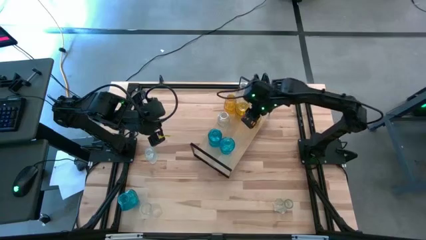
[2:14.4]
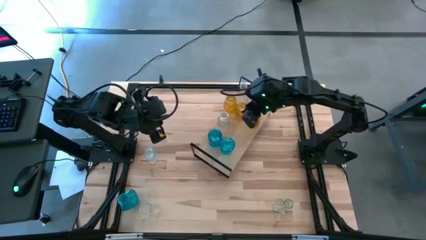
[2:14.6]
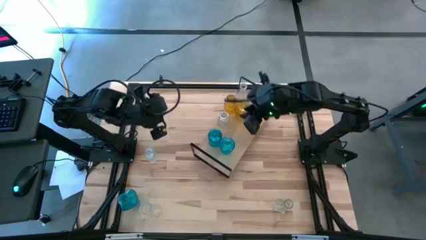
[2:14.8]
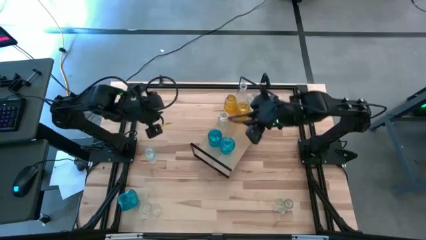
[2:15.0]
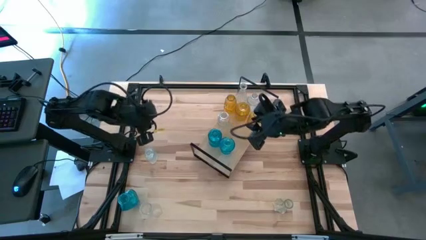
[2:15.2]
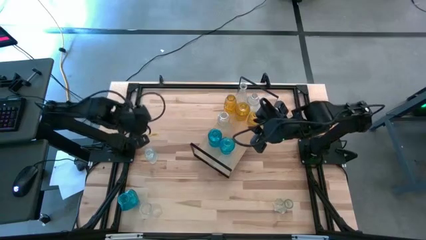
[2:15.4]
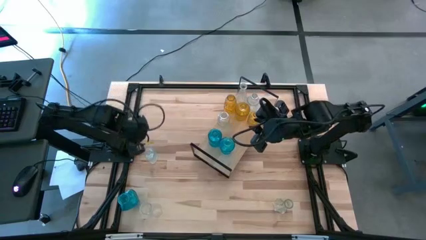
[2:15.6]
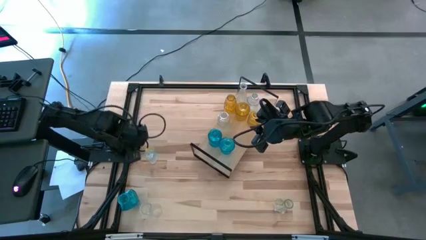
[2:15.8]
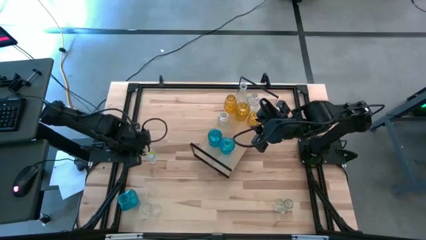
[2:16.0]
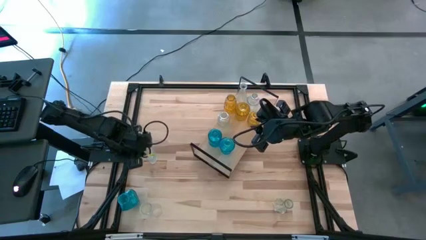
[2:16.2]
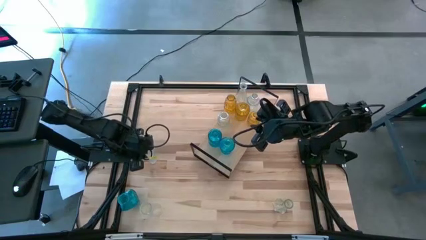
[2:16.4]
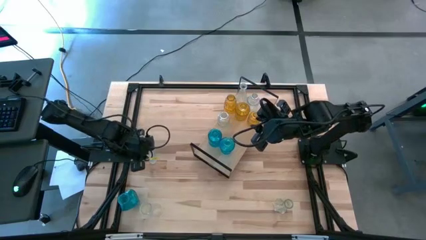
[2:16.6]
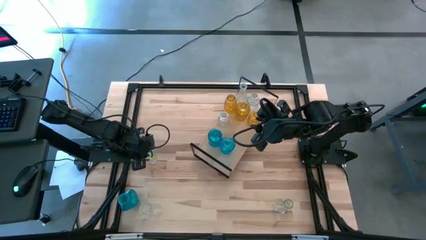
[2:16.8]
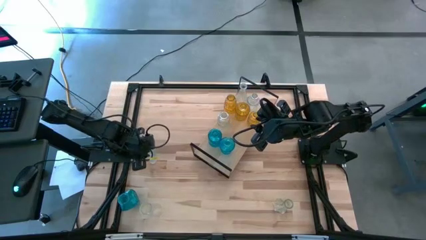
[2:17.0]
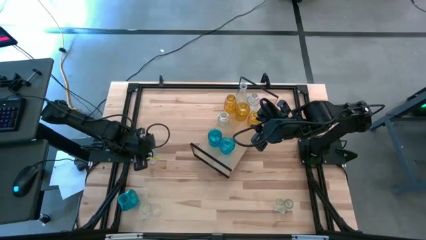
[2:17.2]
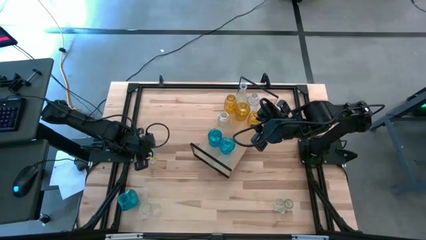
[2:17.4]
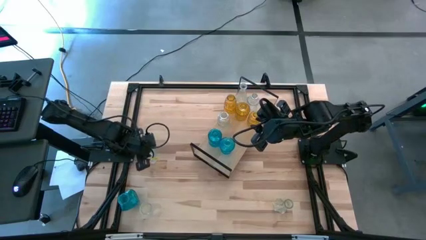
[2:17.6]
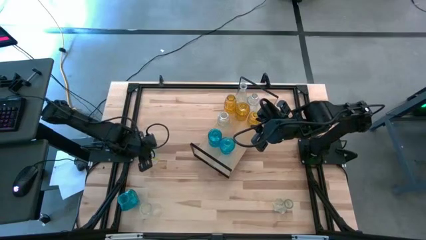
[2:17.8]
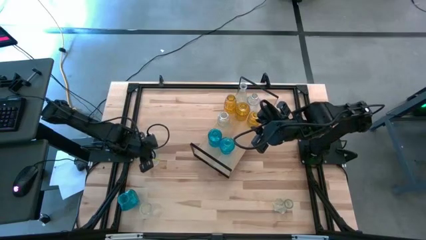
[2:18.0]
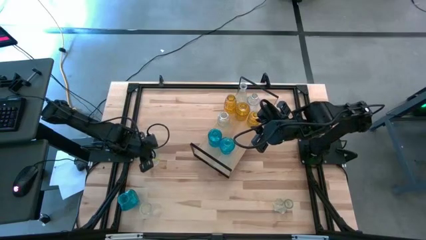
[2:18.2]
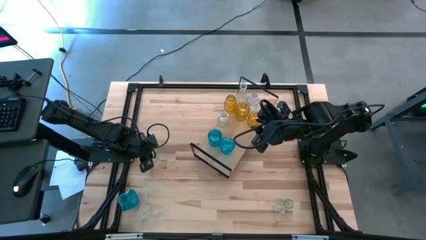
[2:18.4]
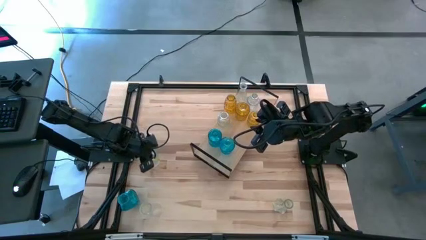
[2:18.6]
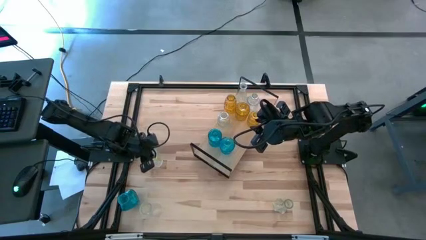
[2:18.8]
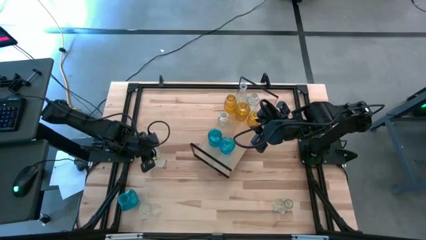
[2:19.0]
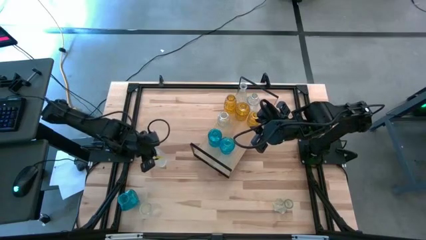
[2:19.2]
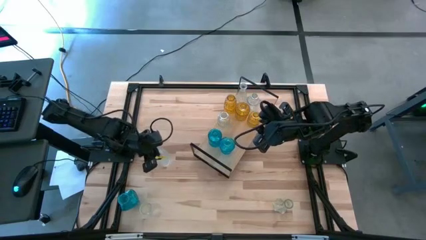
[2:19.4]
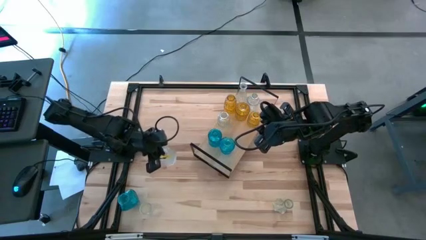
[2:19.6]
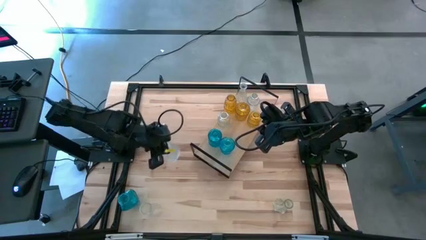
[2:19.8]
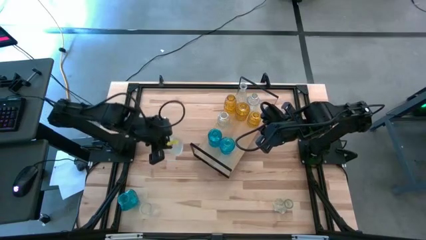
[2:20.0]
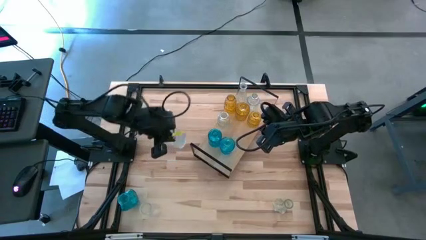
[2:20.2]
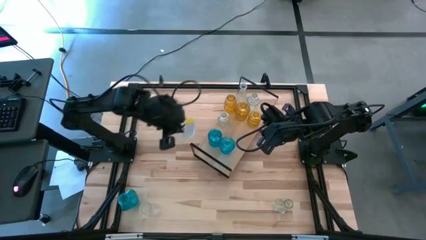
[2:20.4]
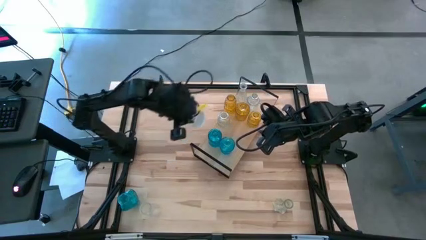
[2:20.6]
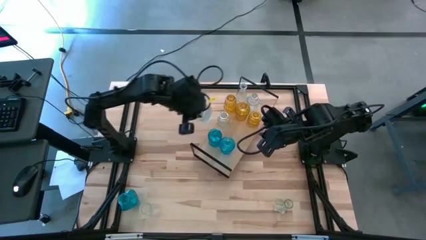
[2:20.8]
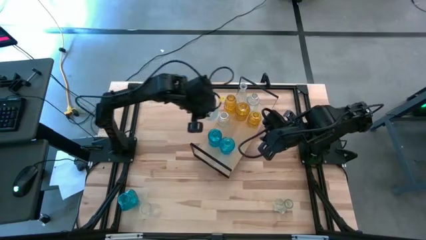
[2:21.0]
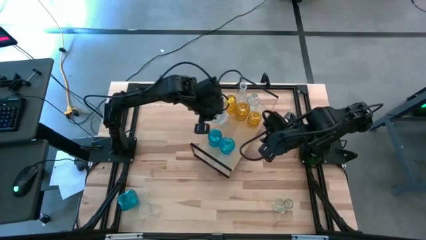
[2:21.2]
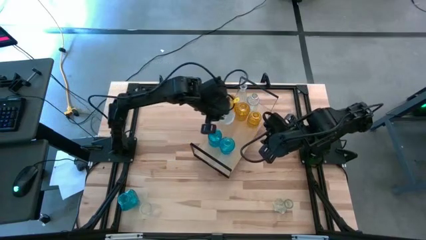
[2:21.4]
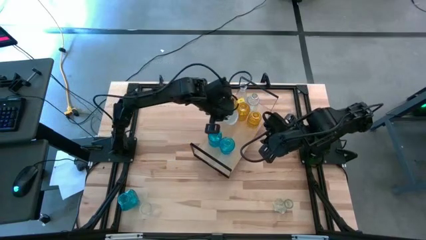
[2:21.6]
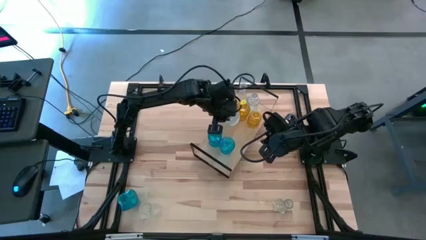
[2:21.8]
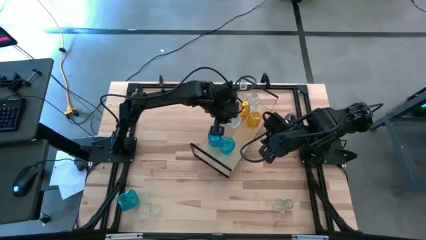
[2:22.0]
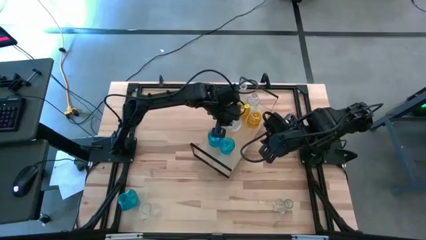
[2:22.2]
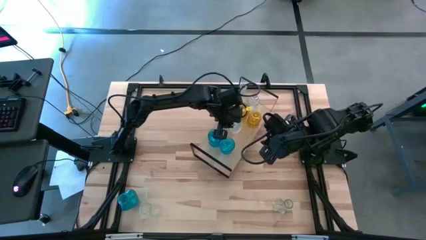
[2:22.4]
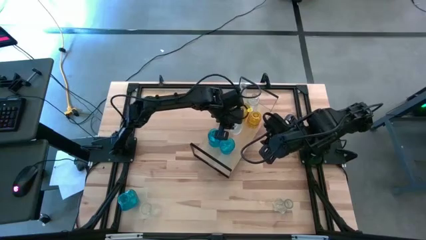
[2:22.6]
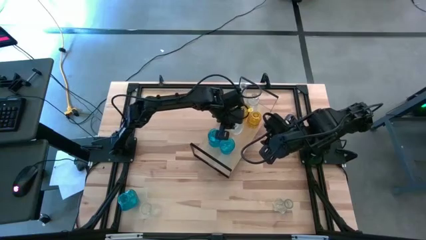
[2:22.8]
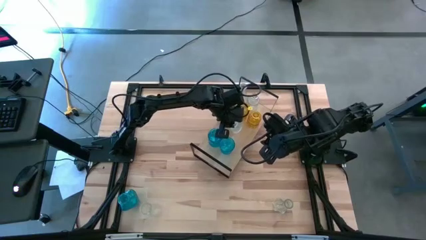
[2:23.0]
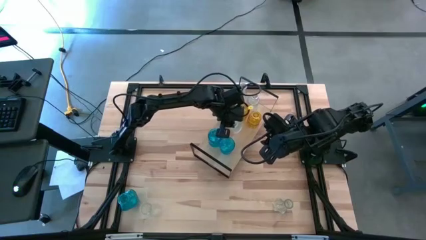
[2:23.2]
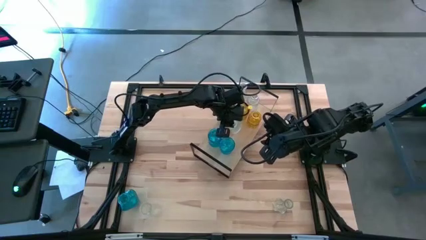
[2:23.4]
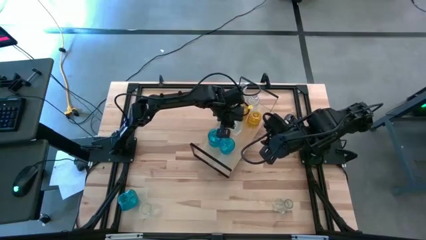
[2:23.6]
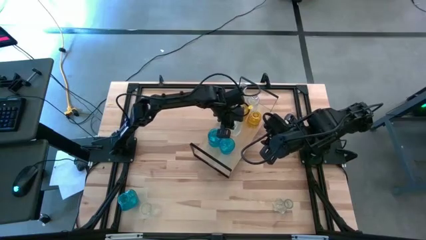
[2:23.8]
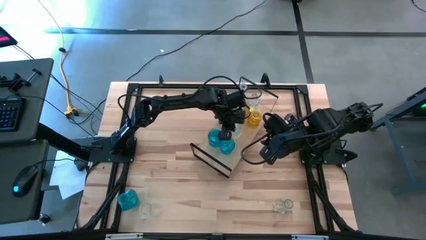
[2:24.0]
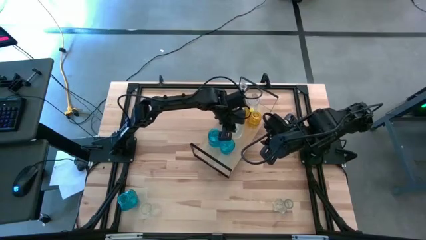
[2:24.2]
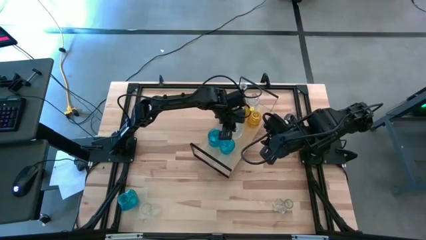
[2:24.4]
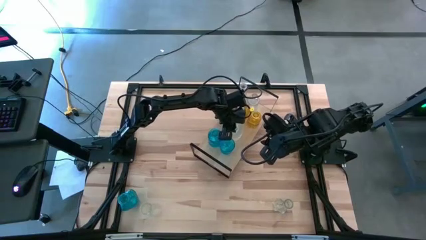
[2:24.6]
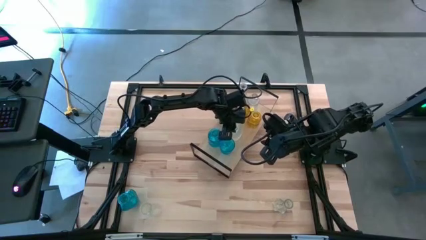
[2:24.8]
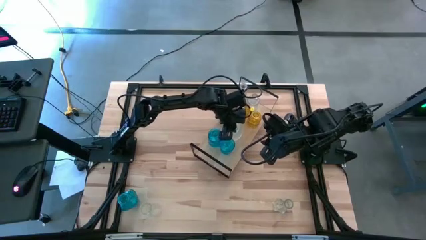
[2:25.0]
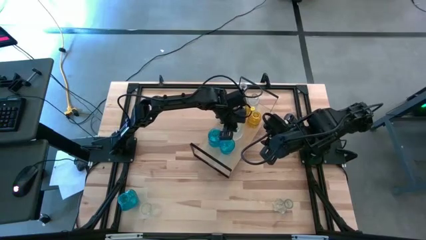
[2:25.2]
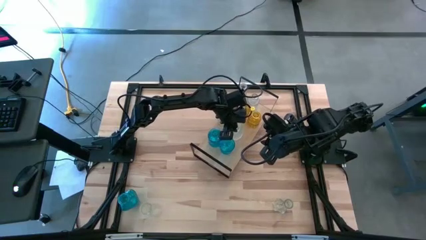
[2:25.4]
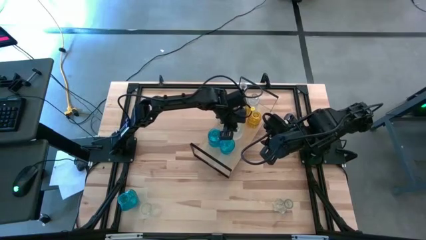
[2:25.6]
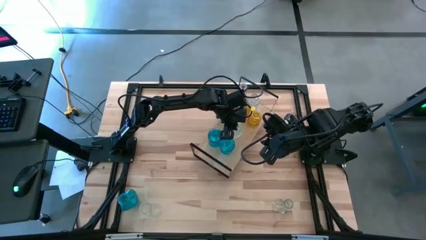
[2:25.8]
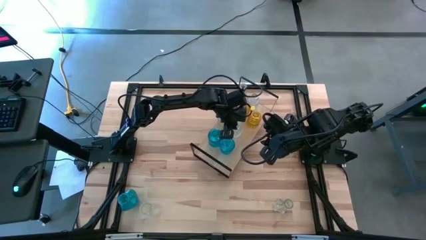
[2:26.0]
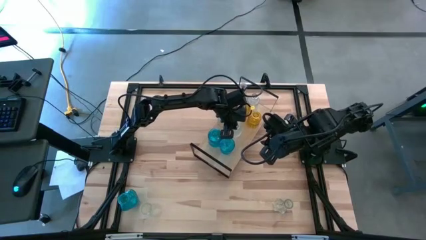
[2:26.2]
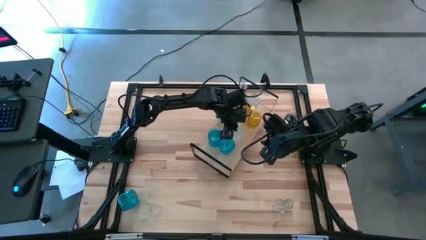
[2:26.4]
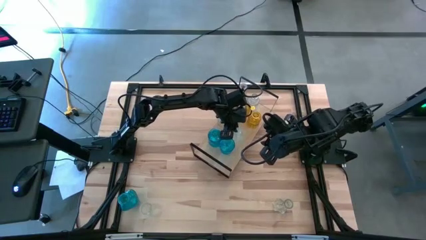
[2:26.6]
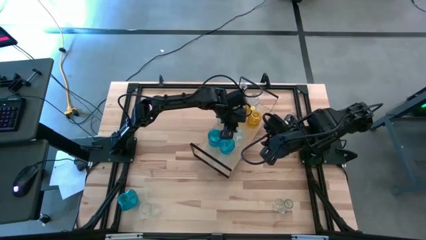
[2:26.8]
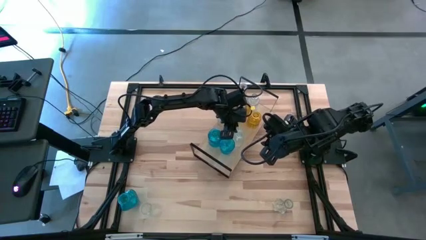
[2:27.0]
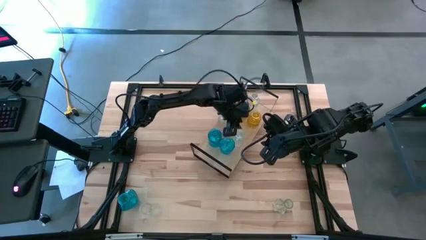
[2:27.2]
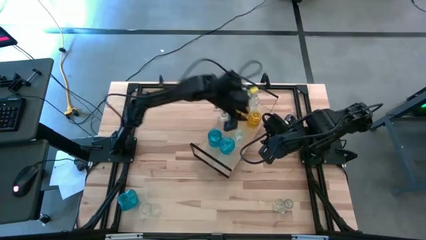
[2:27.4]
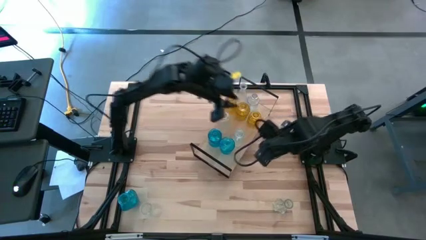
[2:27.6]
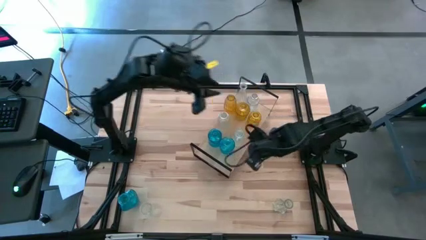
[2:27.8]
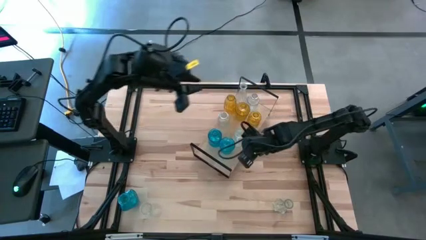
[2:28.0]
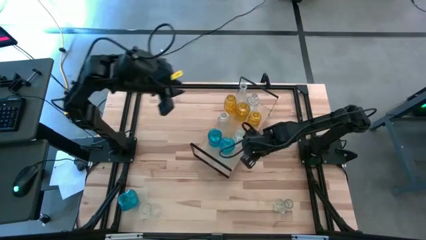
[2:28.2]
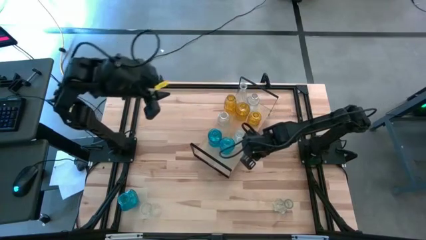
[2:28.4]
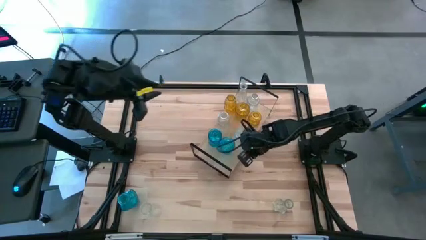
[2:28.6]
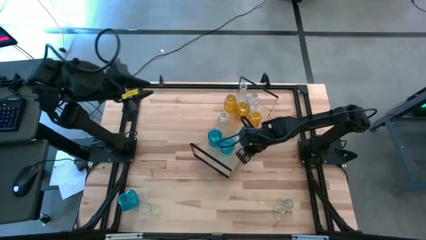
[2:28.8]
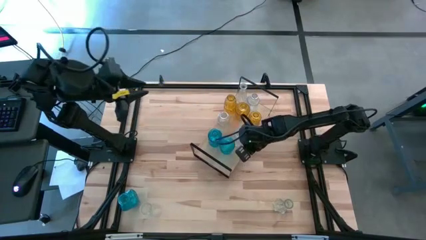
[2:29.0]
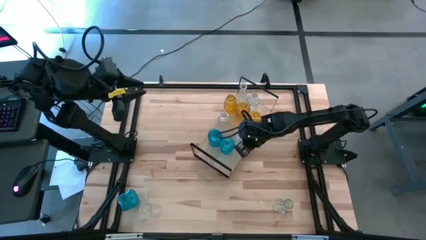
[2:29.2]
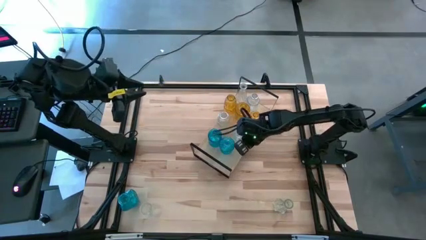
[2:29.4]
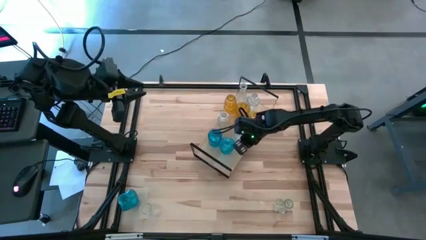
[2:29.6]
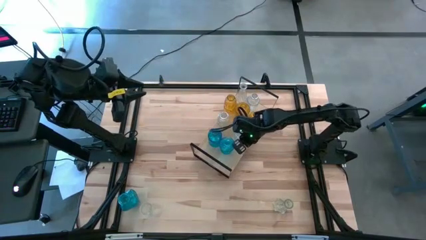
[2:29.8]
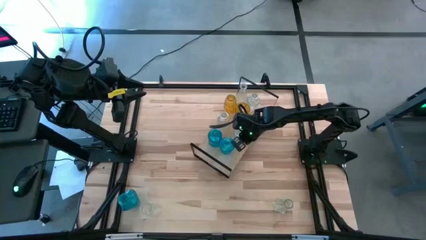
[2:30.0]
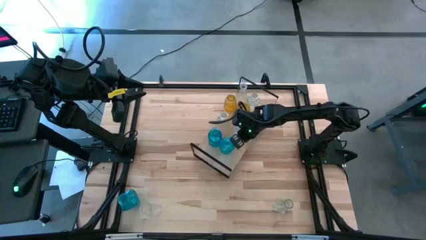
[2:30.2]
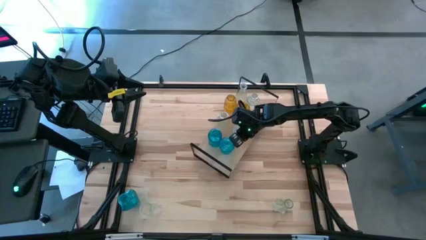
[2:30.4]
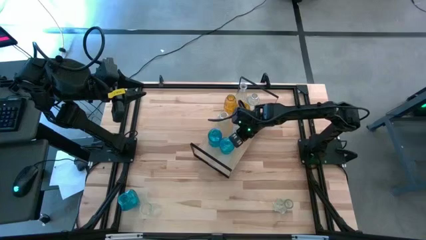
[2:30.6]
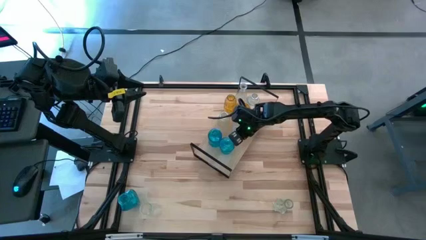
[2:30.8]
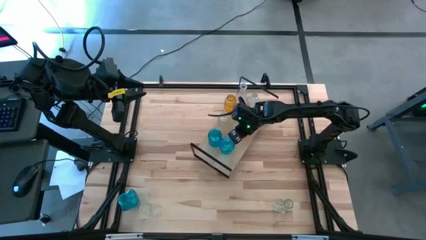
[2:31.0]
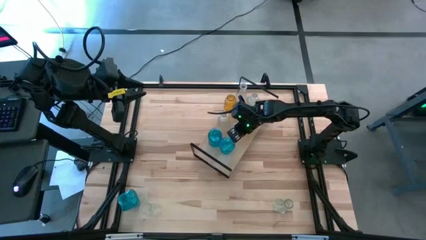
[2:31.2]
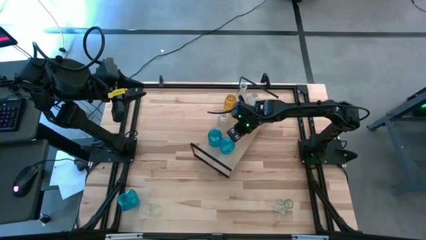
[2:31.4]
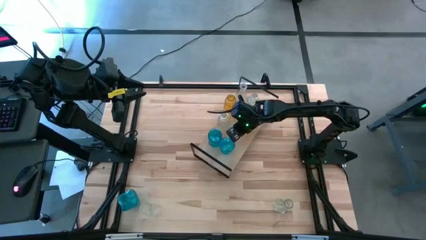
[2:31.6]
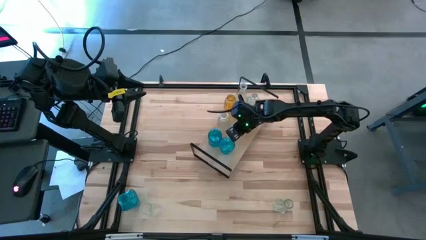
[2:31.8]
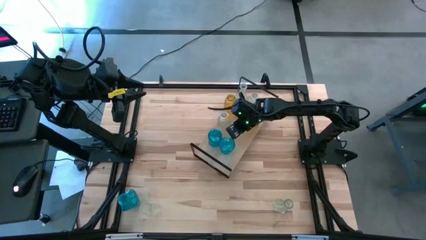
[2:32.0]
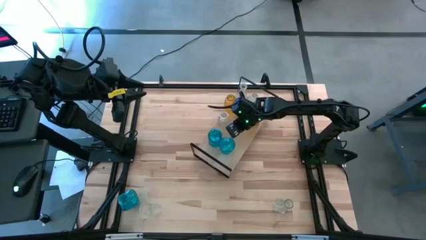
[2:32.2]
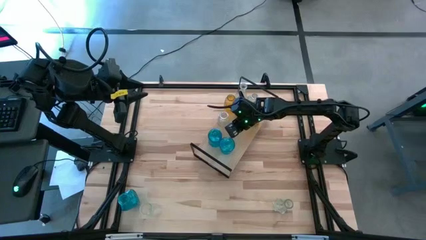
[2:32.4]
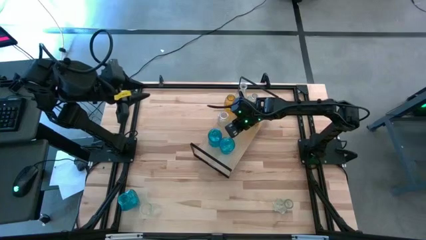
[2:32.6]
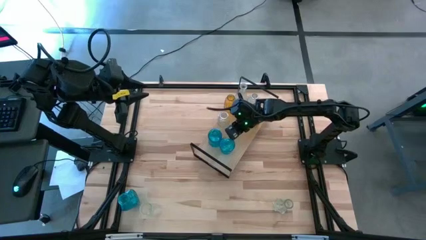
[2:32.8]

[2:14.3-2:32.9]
Task: sort vases onto shelf
Put the top left transparent vase on the shelf and align with the other transparent vase
